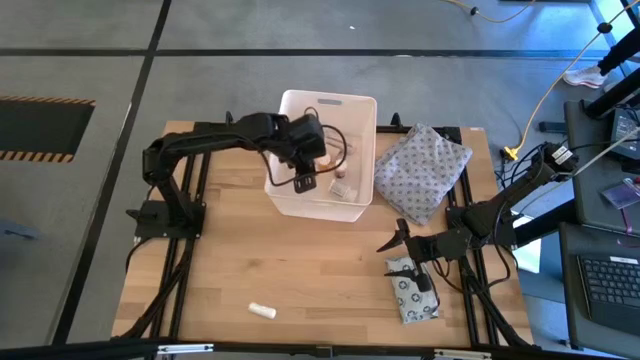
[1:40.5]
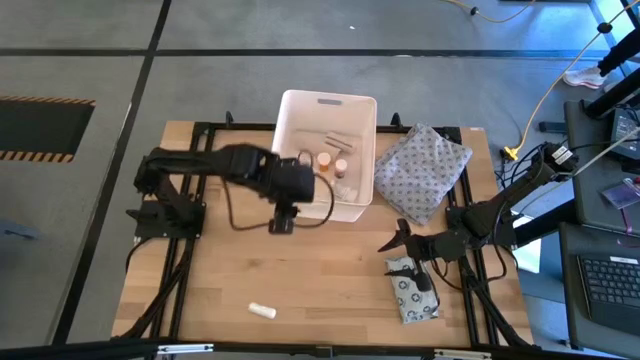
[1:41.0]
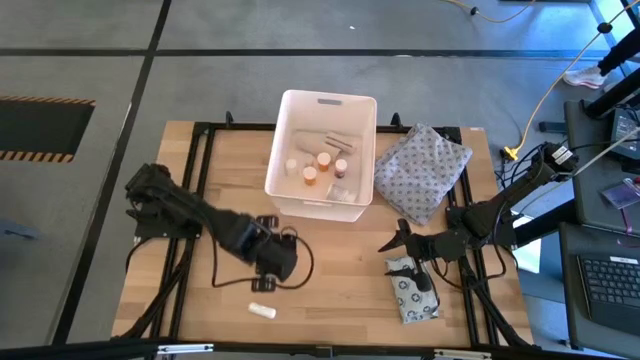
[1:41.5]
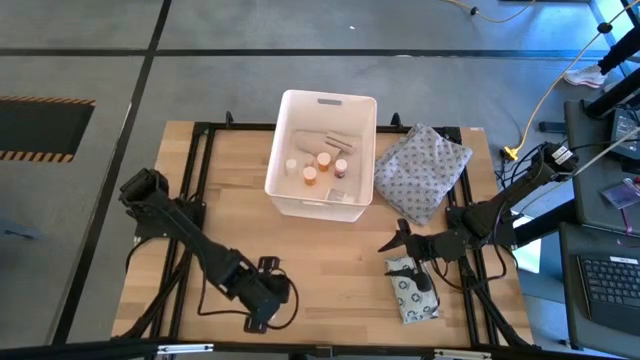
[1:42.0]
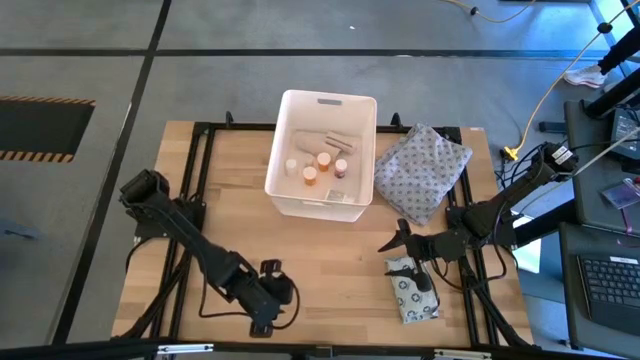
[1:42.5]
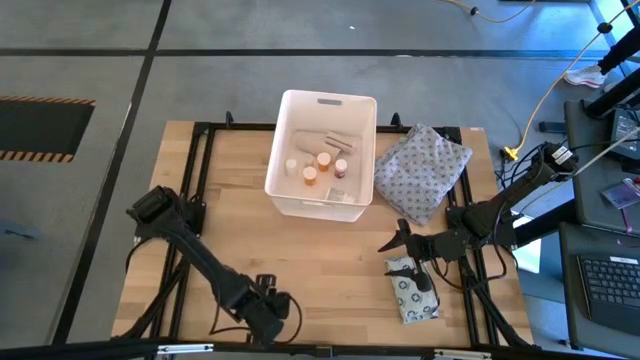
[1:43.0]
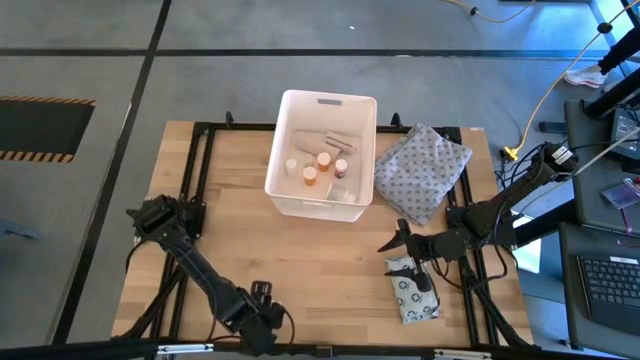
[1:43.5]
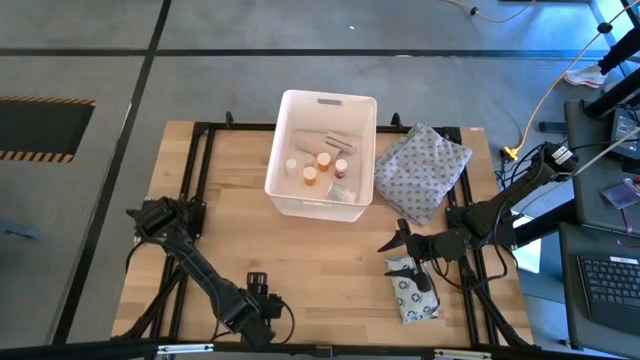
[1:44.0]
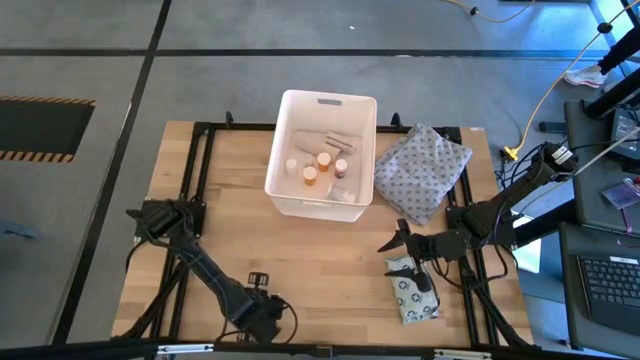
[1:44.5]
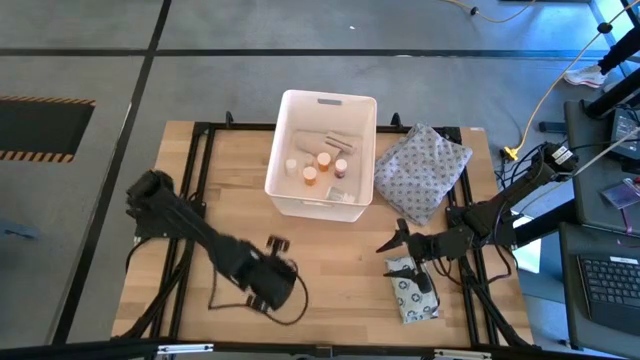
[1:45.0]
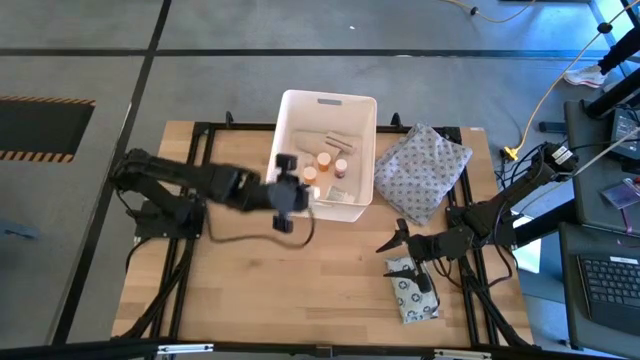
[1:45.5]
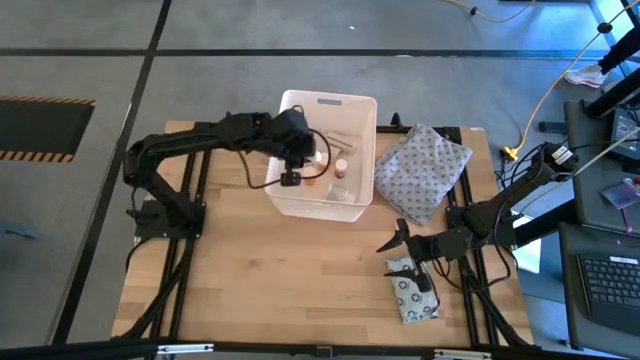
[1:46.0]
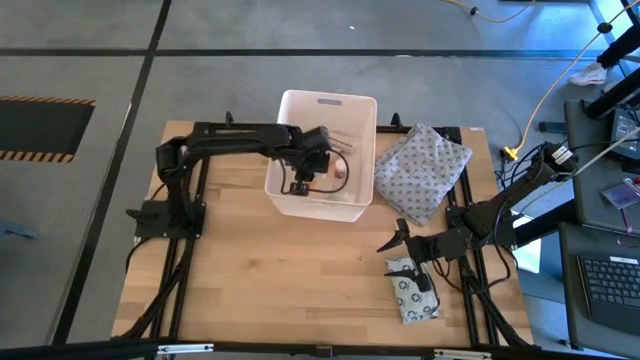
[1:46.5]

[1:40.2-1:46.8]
Task: Pick & place medical supplies in basket/bin
Put the white rolled gauze into the white bin

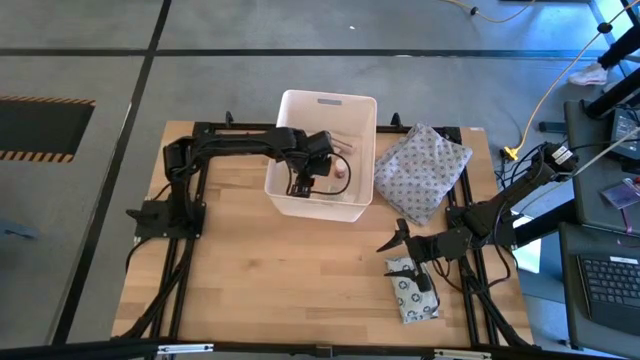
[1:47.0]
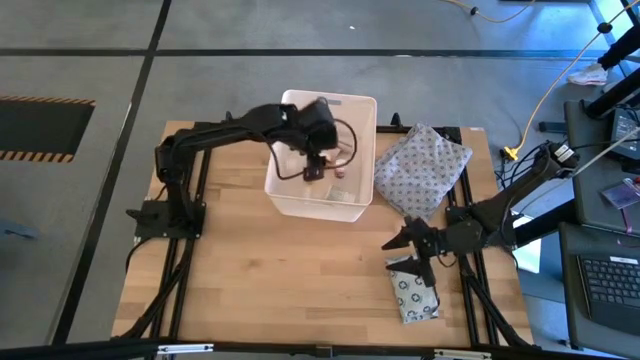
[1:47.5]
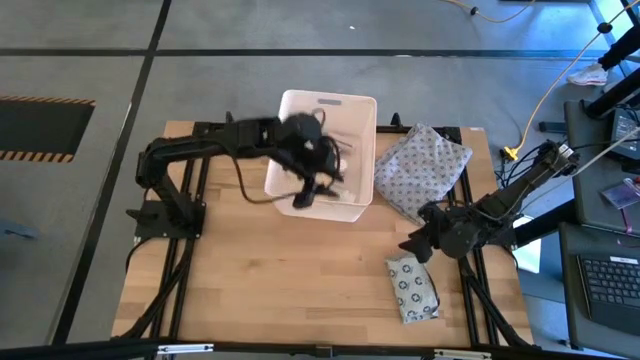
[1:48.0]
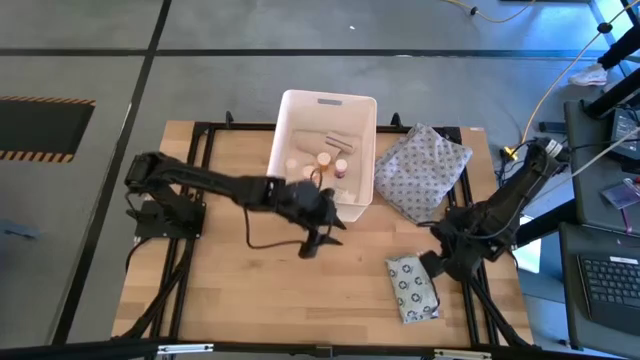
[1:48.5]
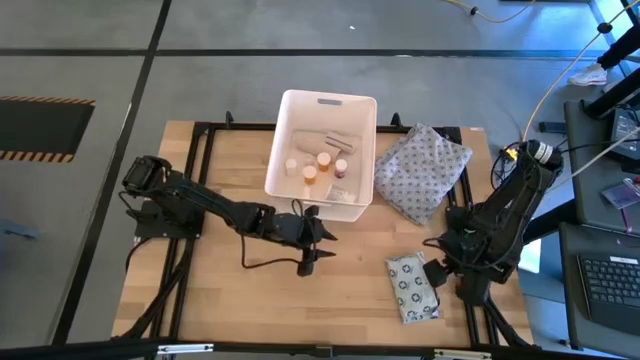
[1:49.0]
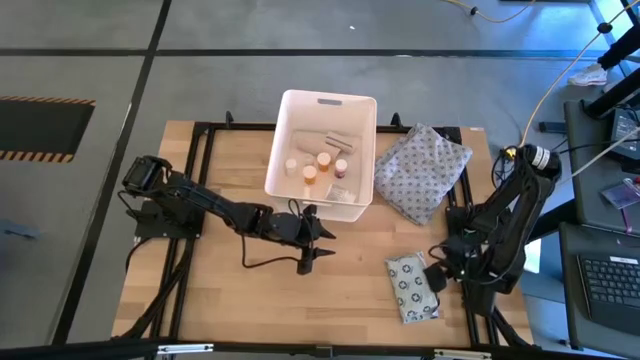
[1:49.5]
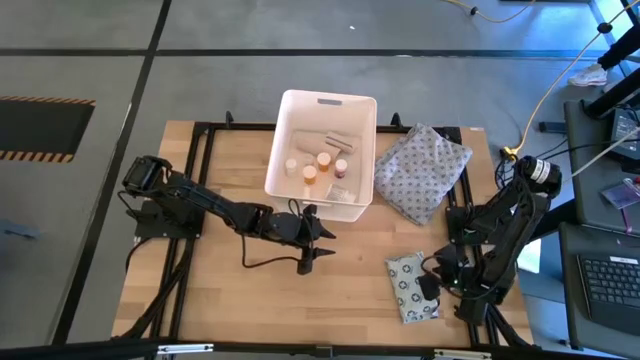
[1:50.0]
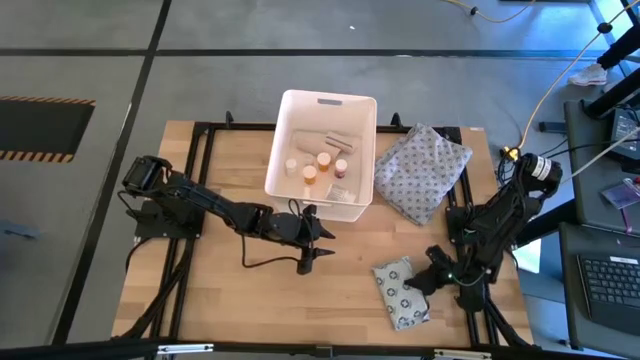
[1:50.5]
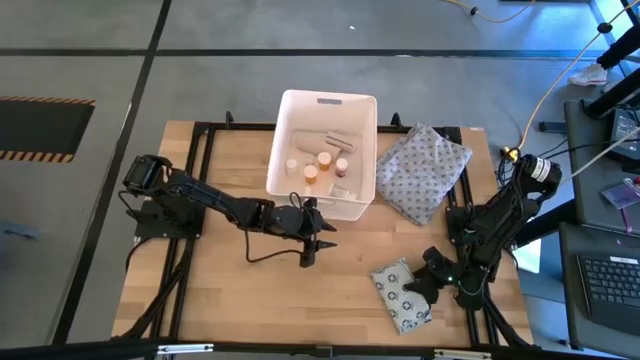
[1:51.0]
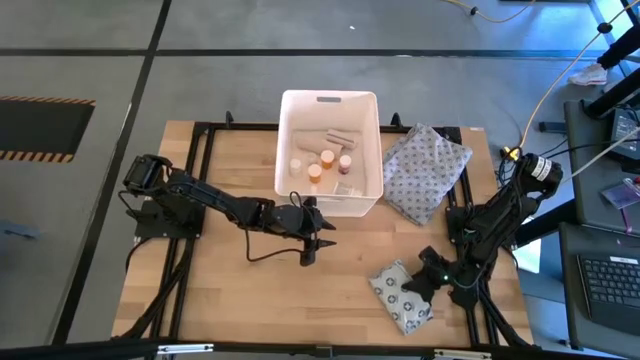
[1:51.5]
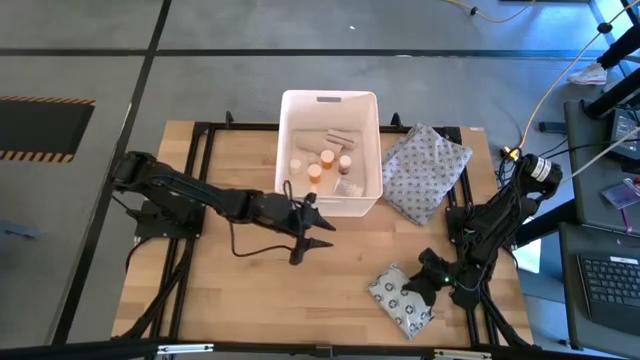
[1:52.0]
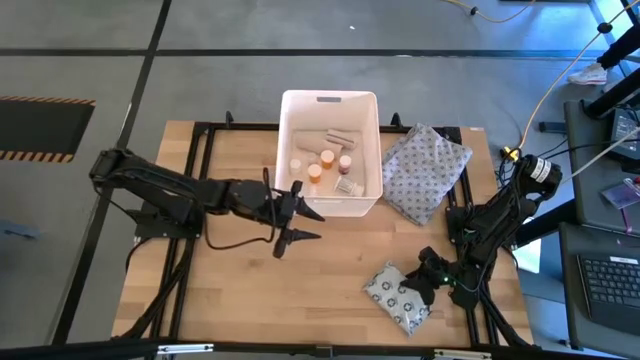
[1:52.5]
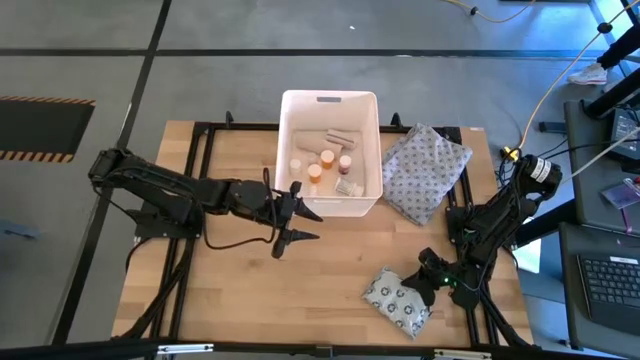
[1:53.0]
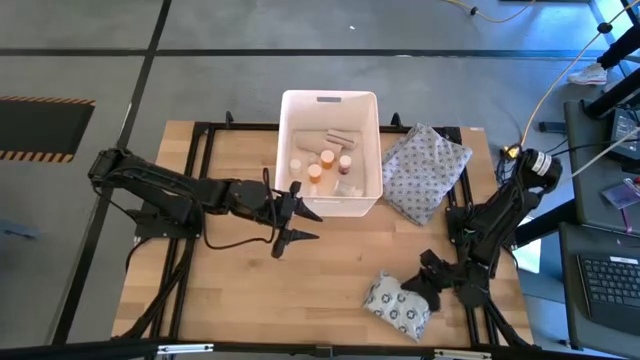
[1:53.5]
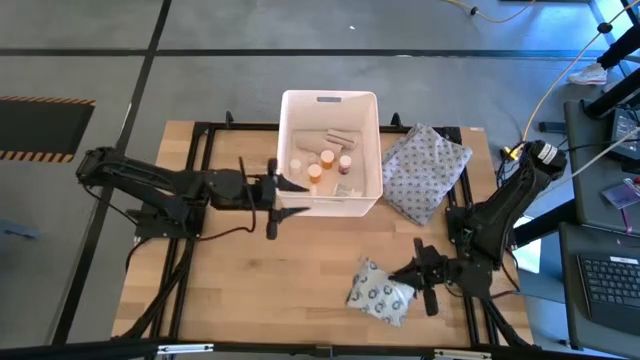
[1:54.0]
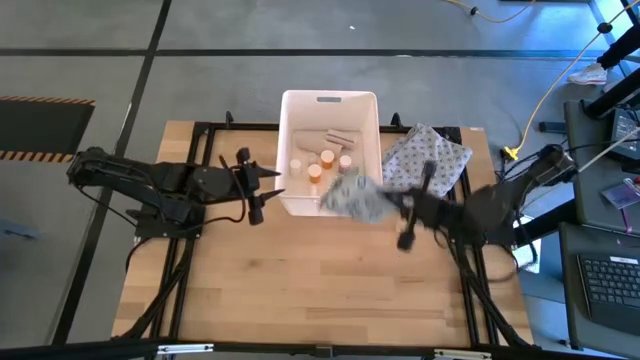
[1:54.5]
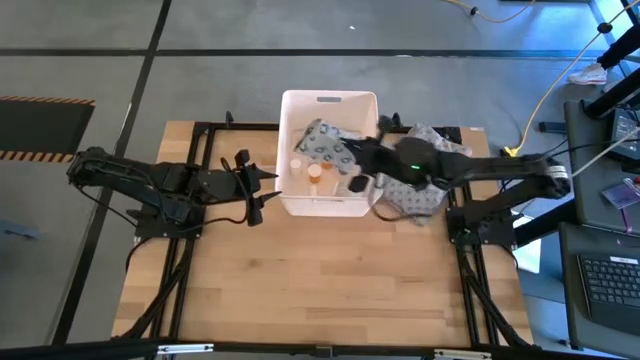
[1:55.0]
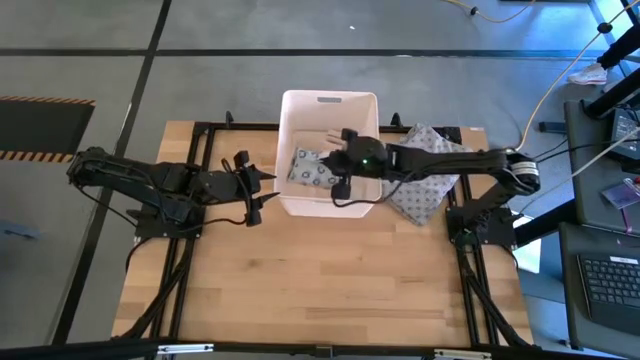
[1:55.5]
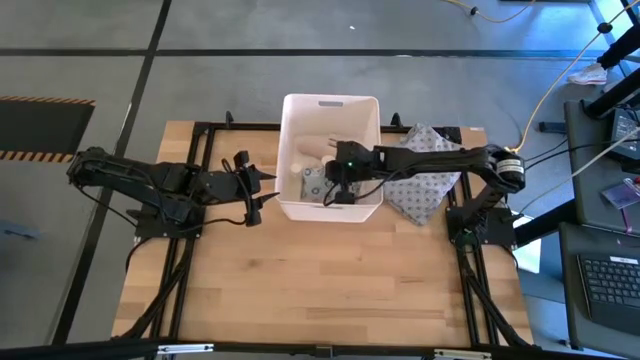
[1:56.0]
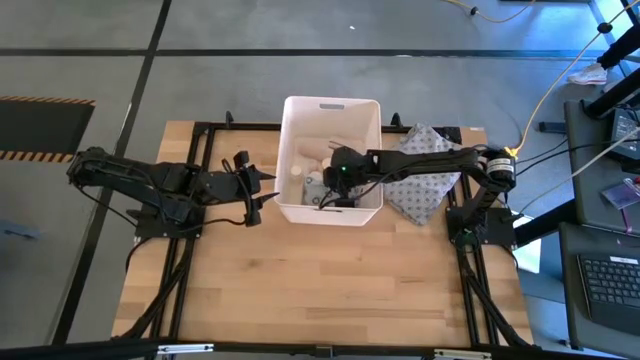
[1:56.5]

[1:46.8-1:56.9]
Put the mailer bag into the white bin

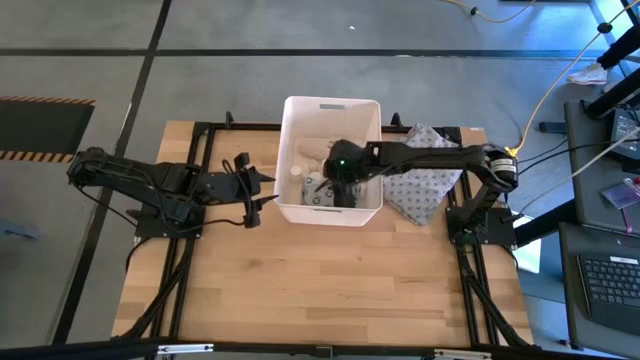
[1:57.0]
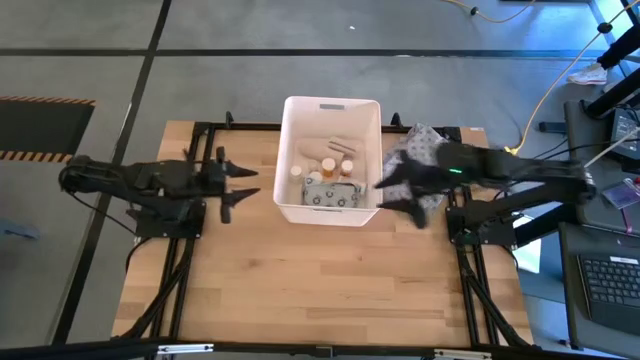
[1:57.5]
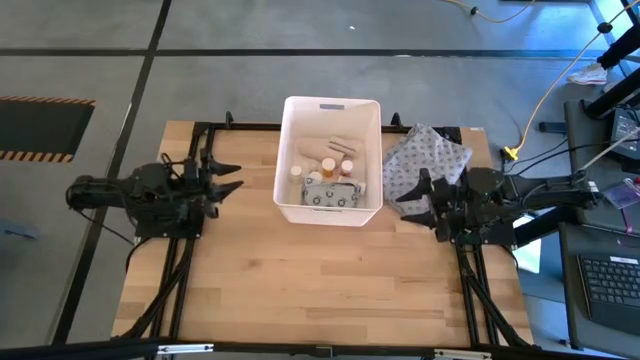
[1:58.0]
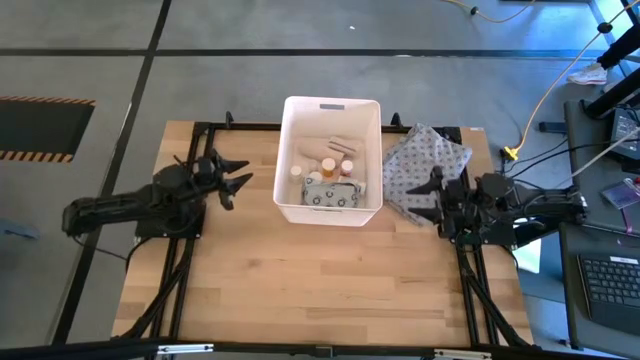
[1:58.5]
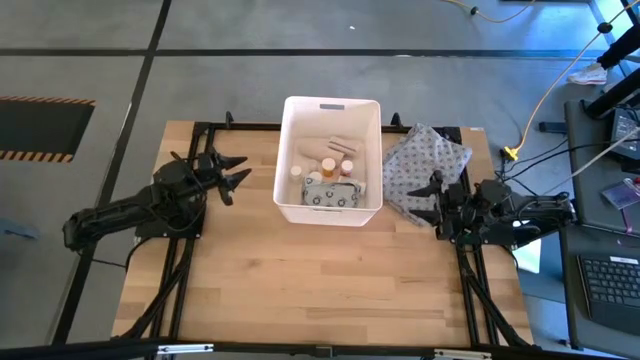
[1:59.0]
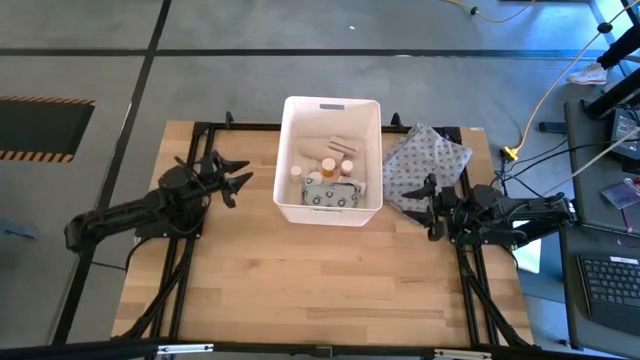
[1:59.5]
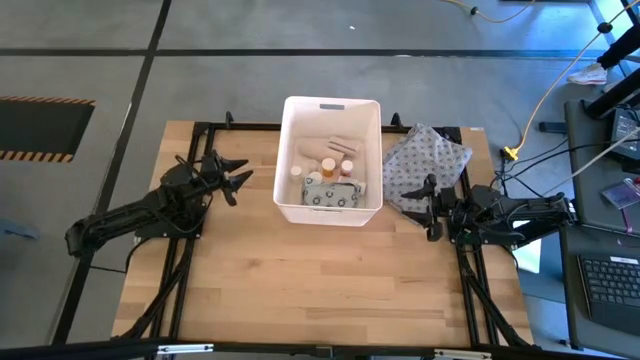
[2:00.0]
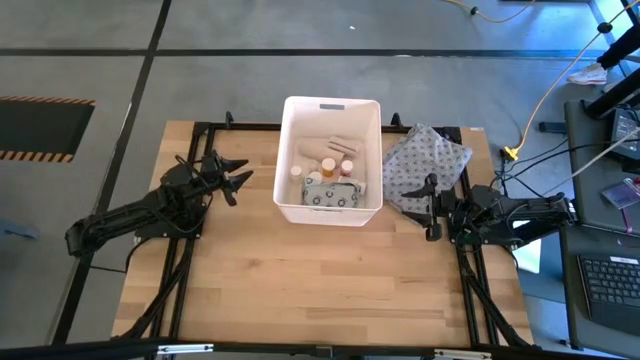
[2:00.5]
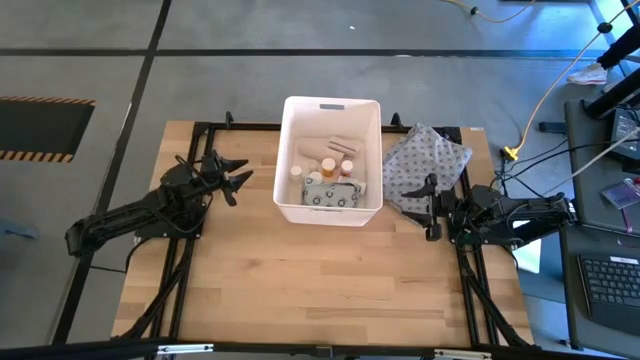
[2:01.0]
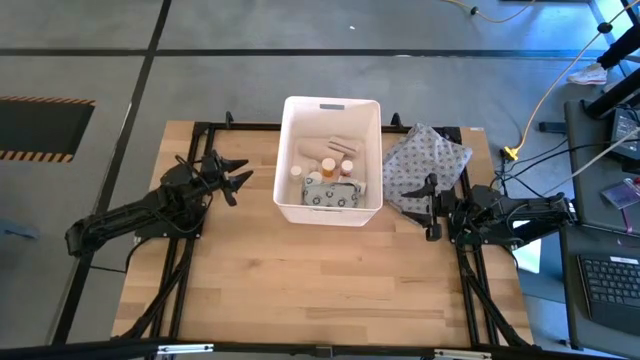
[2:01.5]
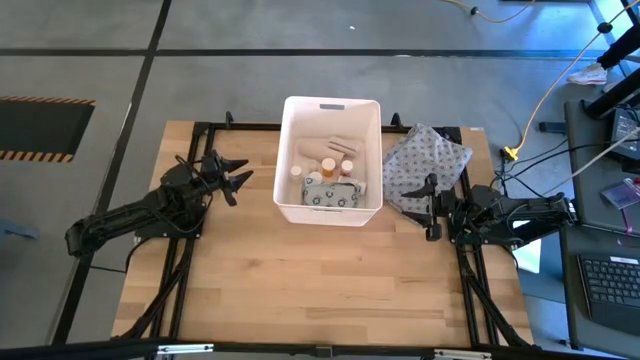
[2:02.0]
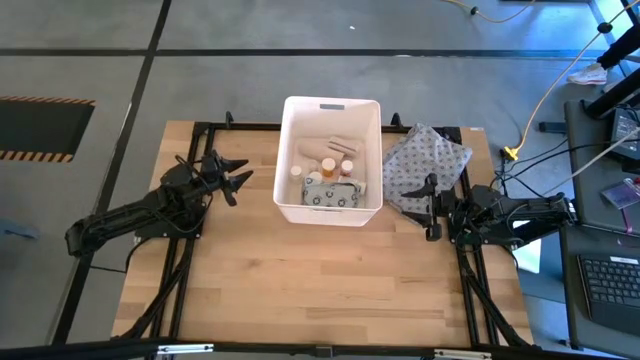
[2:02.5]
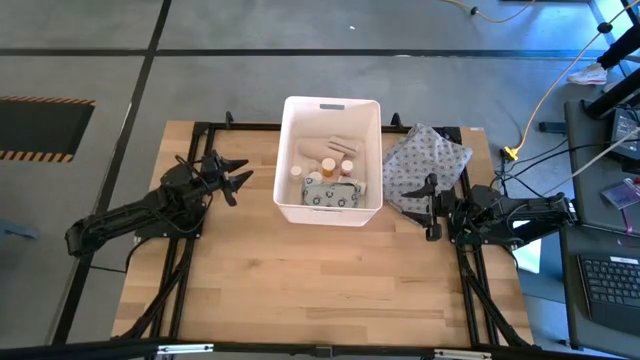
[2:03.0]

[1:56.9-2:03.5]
Return to Home Position
